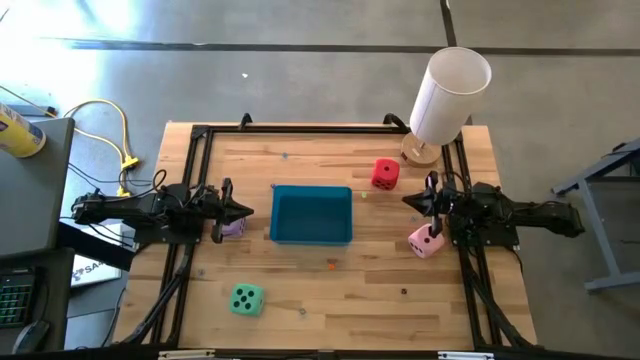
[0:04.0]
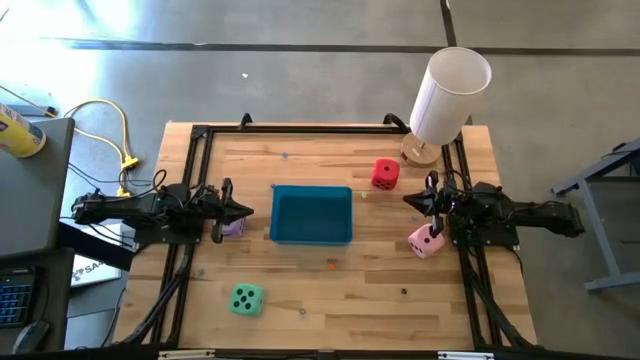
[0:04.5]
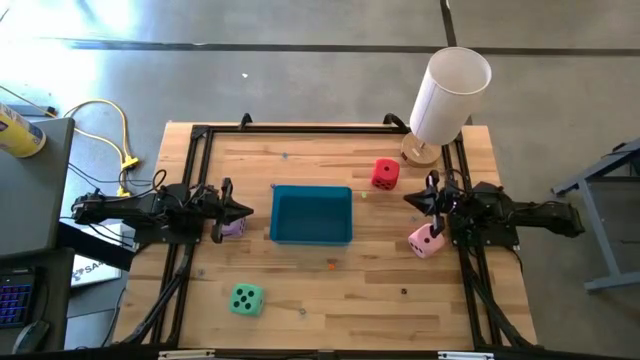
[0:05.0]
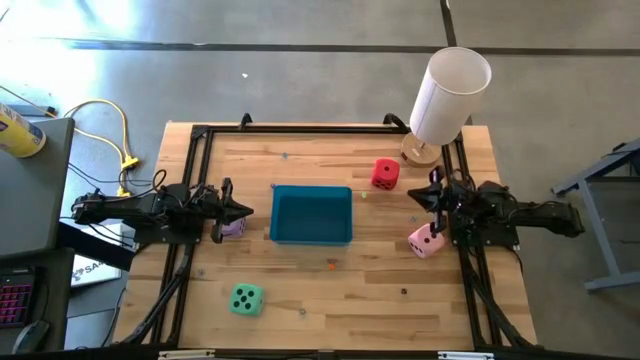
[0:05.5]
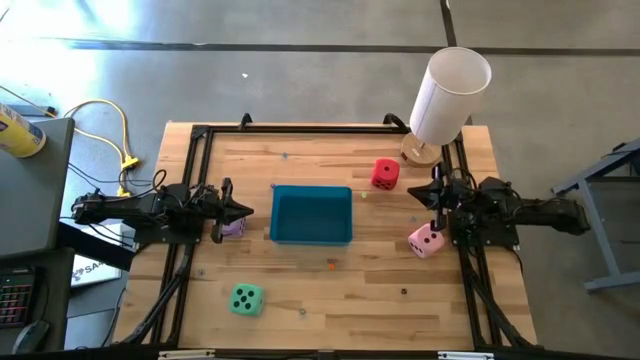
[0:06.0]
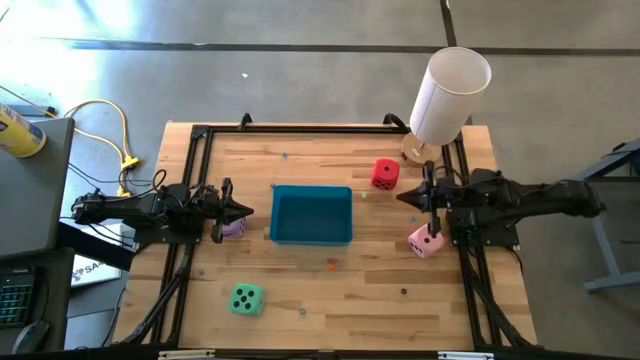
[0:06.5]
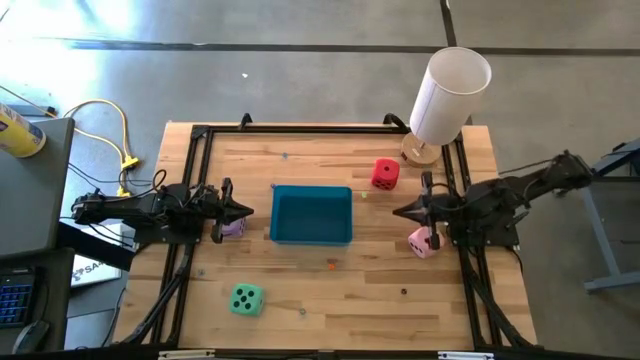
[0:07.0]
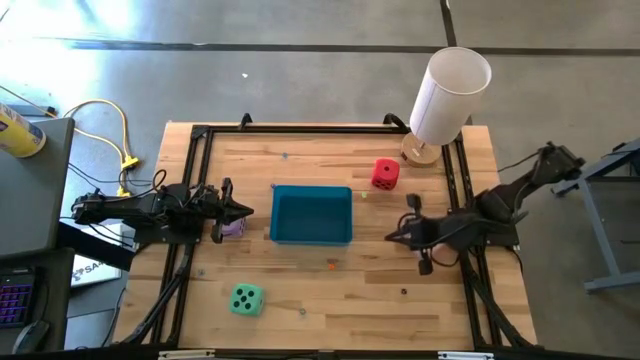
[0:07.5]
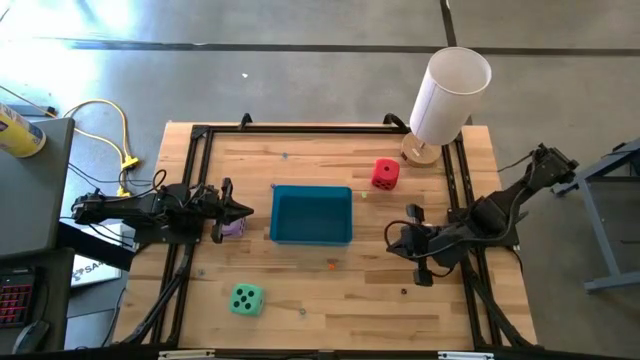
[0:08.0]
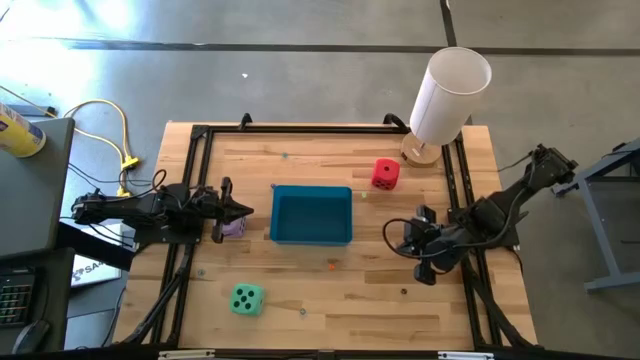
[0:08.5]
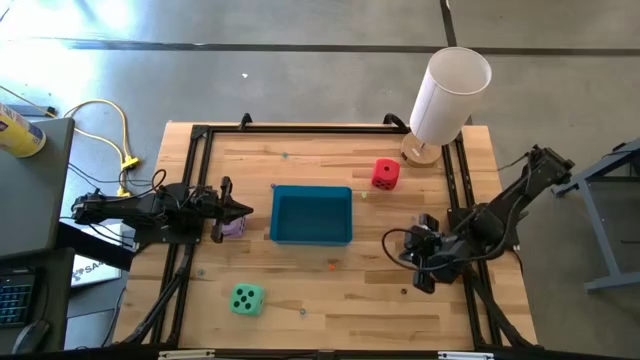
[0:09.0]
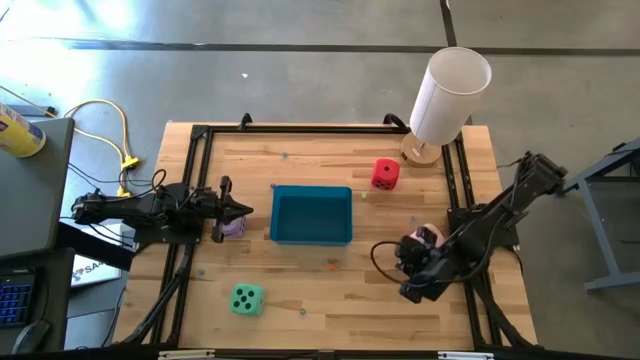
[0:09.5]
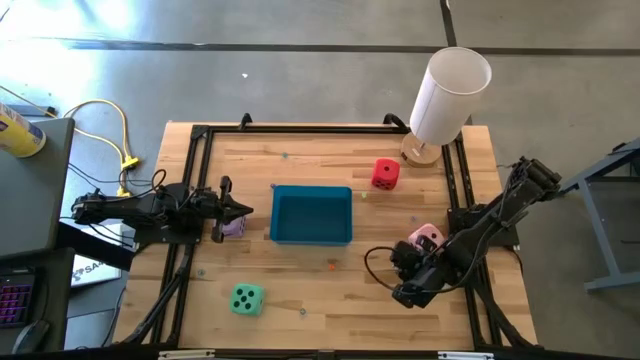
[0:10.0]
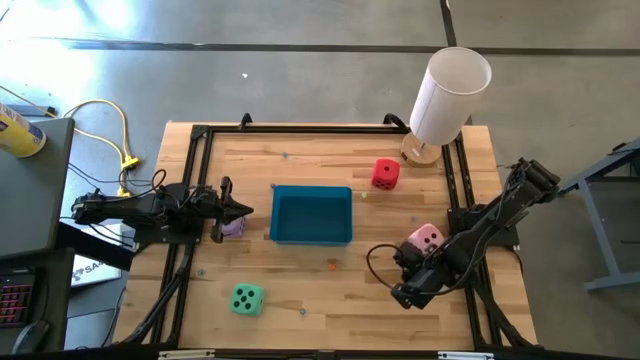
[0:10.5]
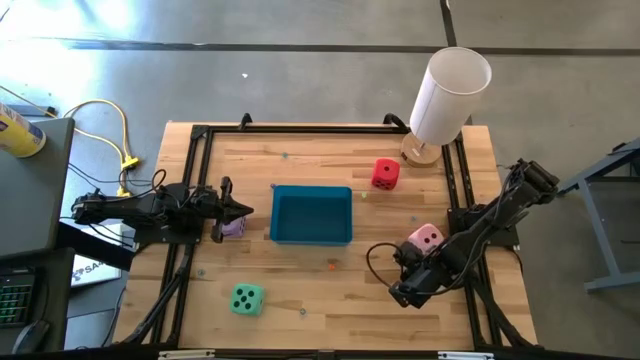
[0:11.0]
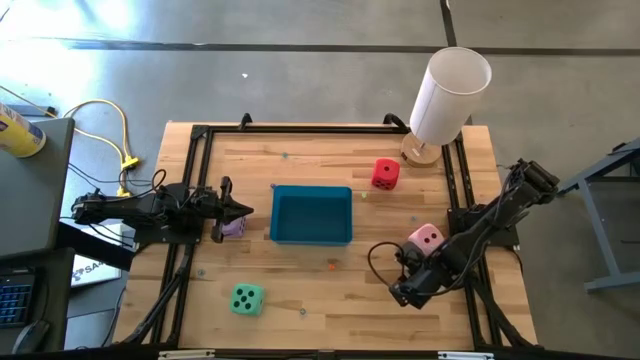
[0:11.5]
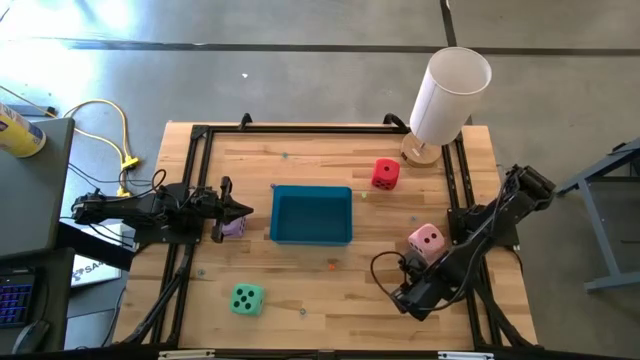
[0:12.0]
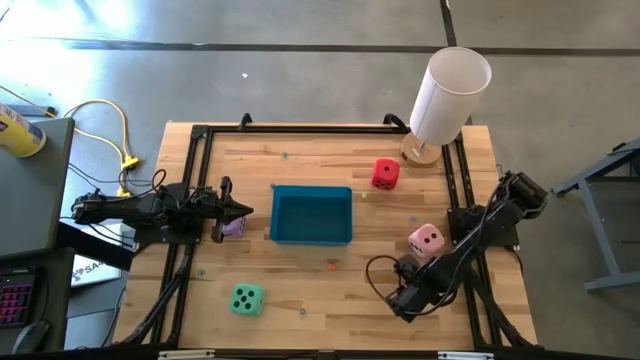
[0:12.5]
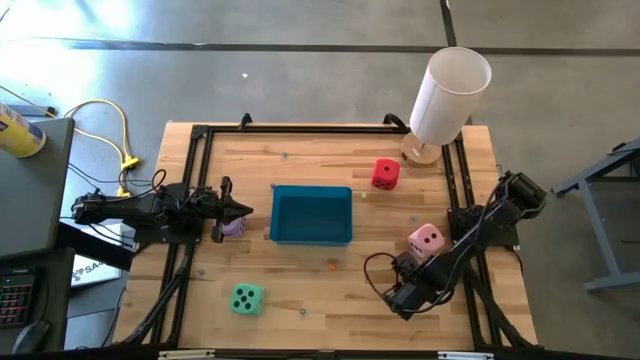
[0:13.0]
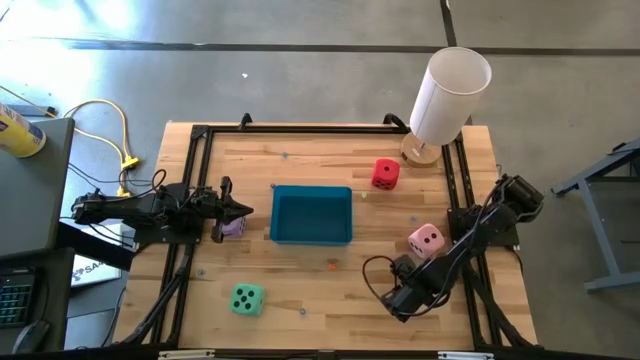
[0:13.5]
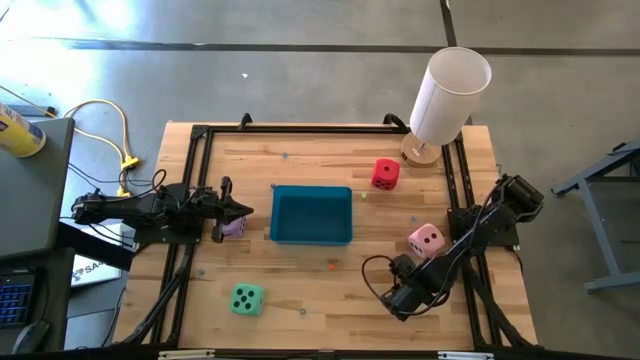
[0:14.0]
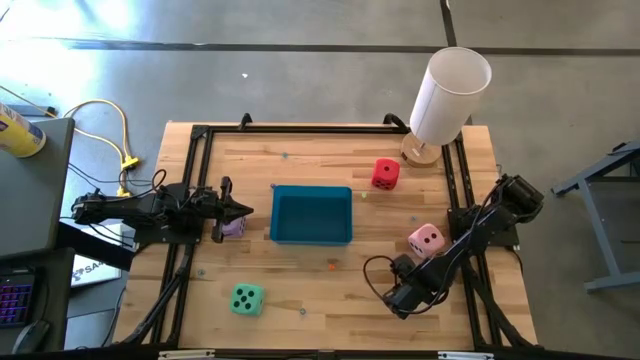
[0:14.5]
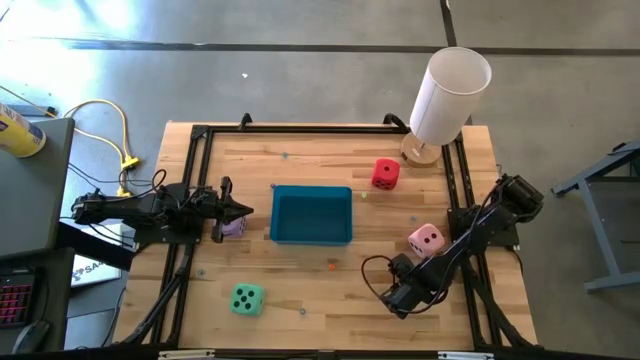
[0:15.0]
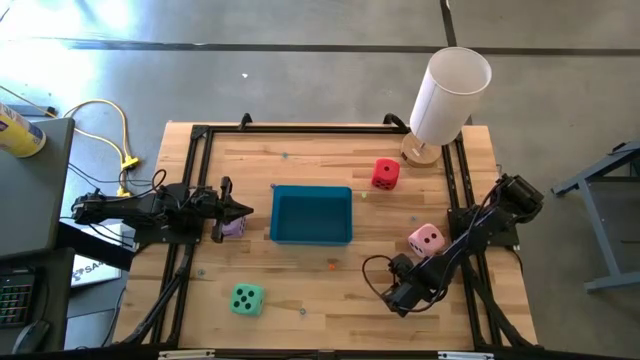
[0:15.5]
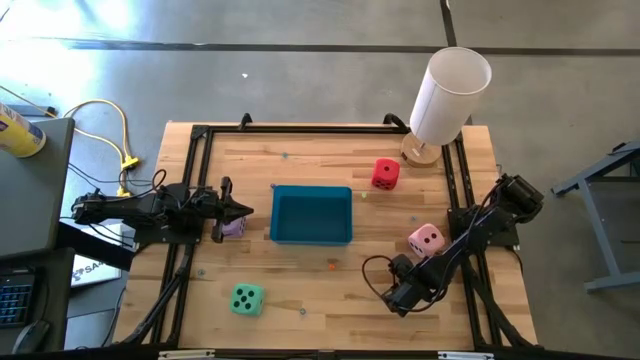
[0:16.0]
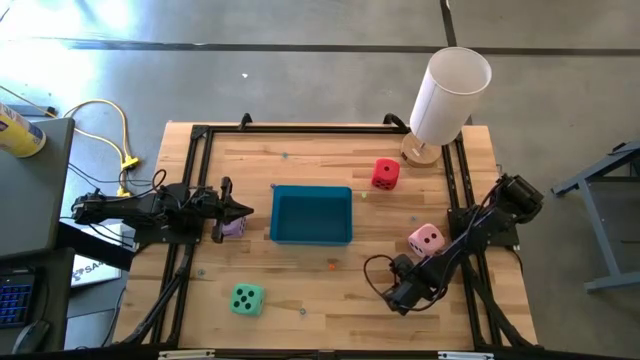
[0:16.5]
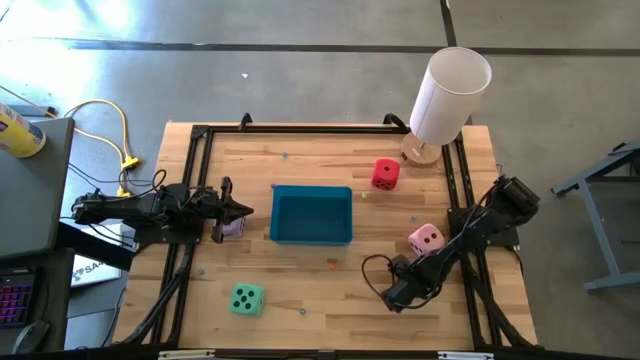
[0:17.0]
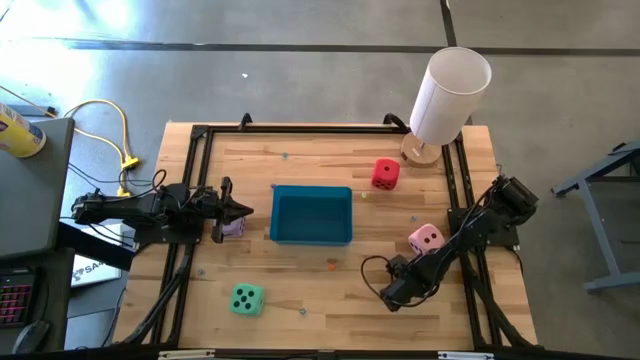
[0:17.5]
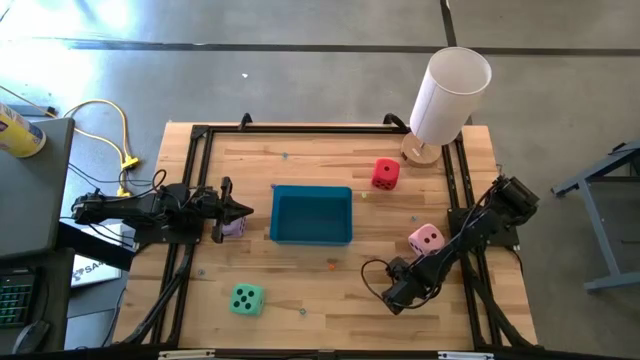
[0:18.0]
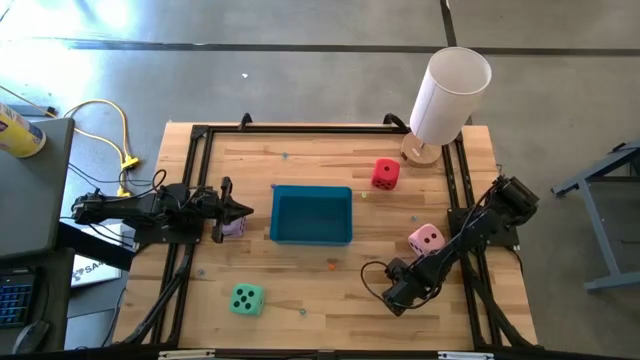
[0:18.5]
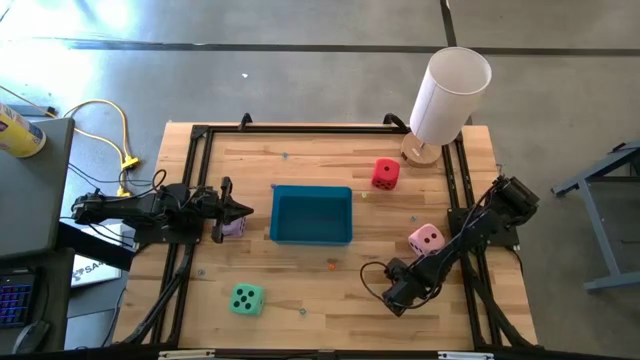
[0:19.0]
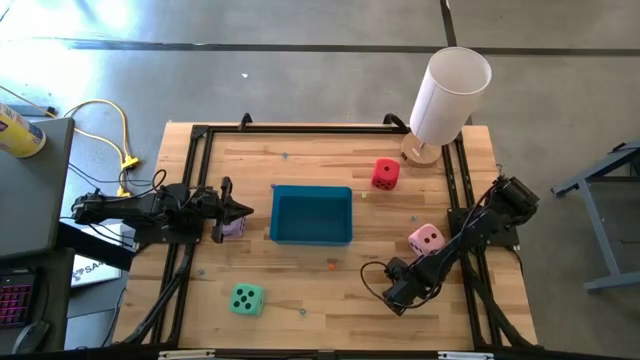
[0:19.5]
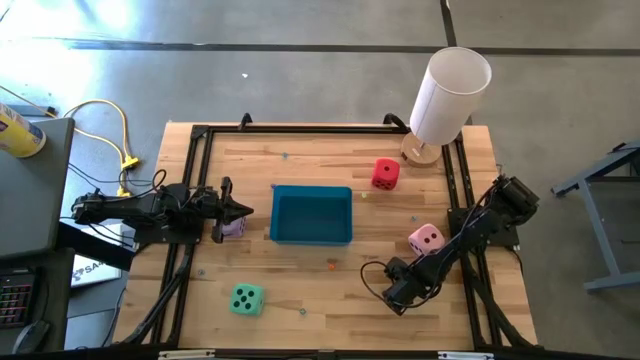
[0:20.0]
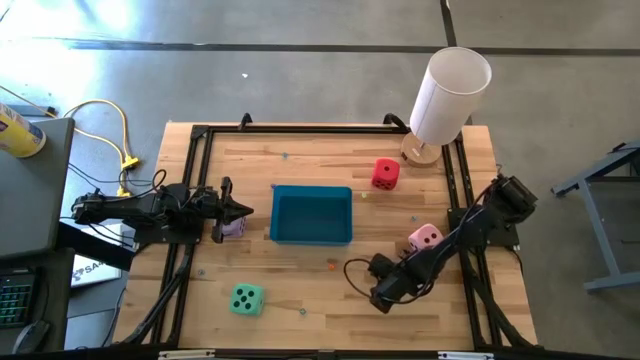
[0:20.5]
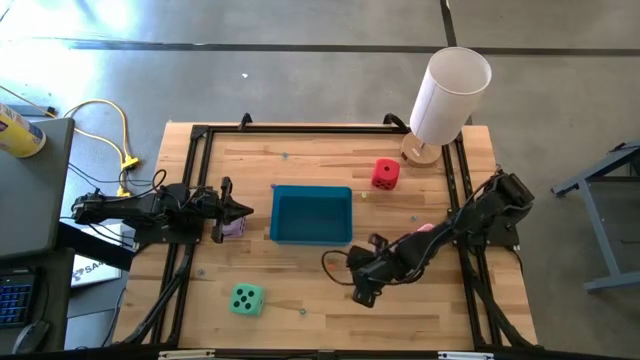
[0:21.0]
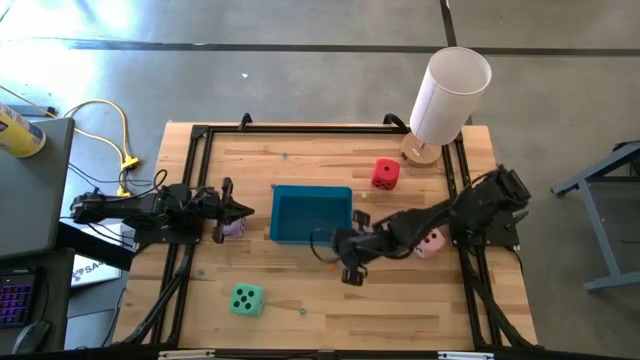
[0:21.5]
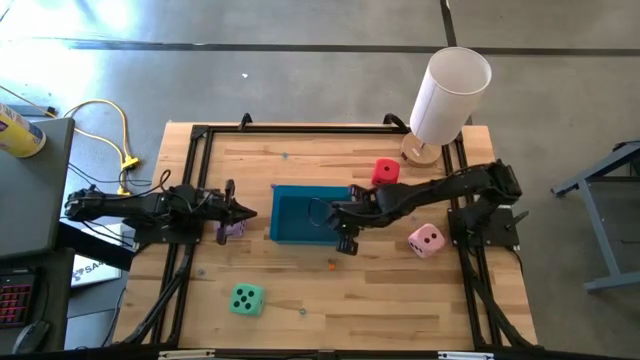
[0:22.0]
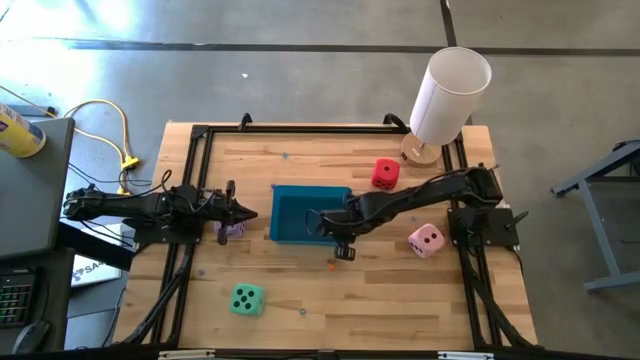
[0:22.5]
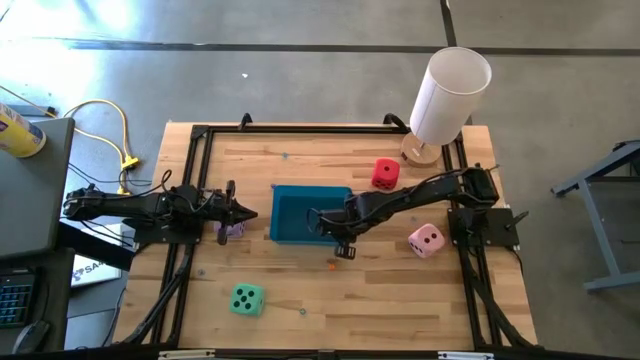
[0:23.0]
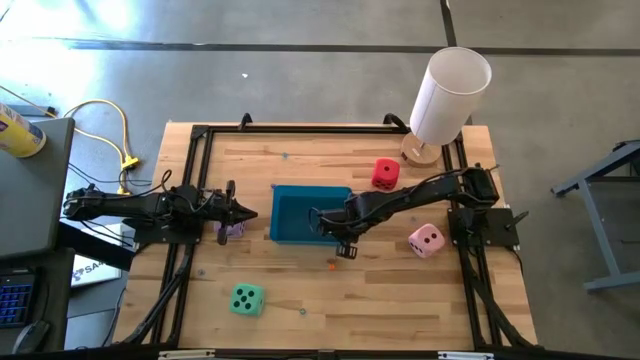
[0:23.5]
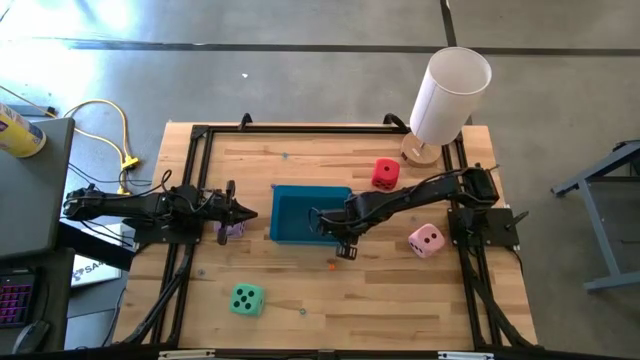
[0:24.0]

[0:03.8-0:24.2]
Task: Pick & Place Dice
Put the small black dice into the blue bin

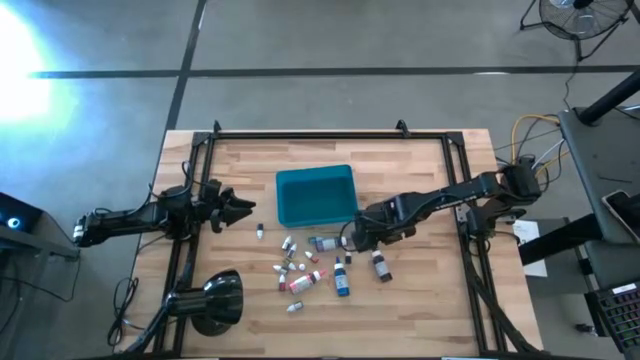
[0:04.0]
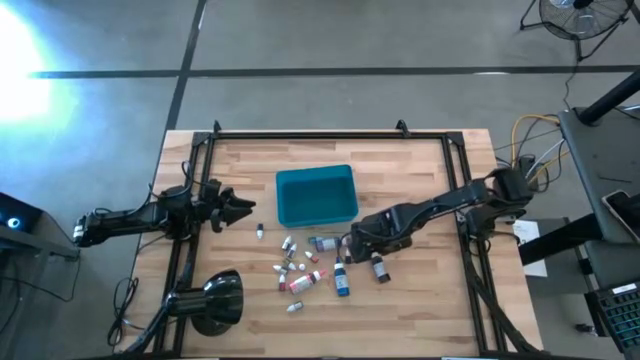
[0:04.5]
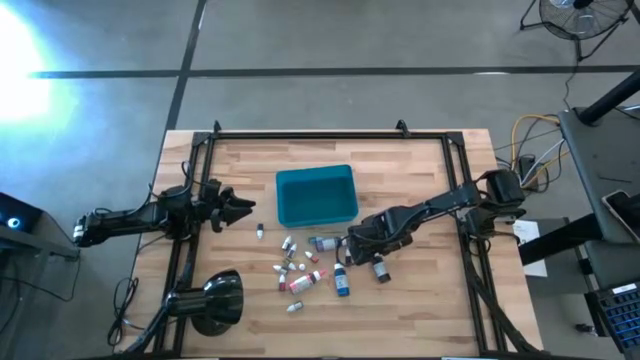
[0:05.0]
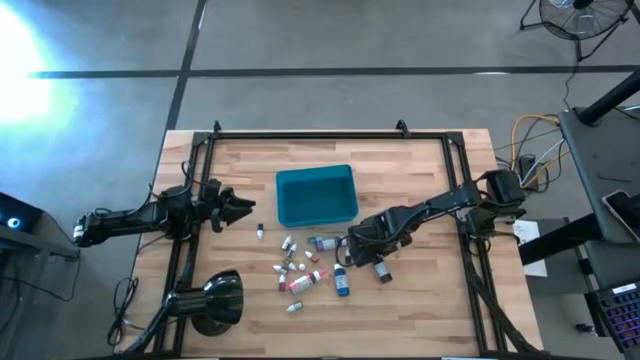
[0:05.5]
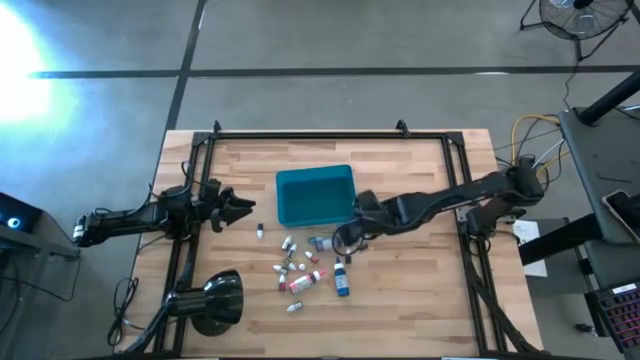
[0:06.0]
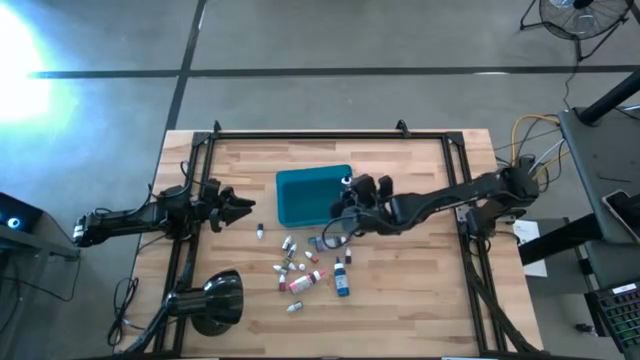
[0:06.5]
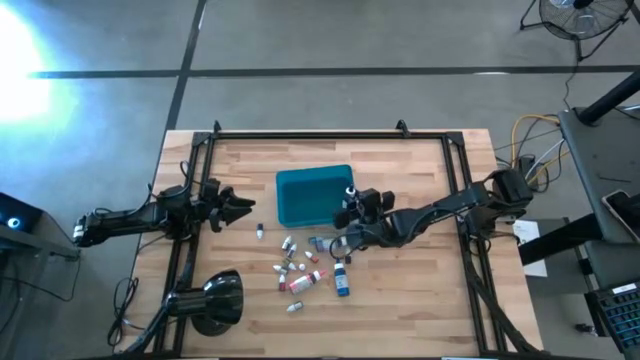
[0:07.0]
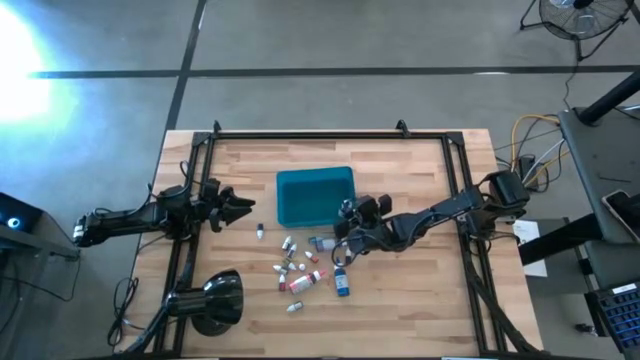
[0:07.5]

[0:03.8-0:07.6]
Task: Pick & Place food coloring
Put the large black food coloring bottle into the blue bin
